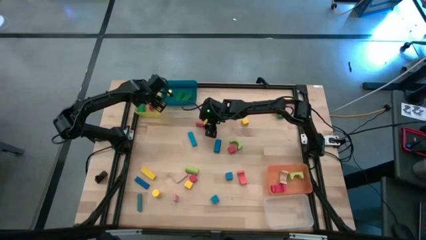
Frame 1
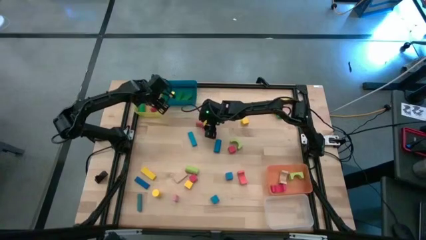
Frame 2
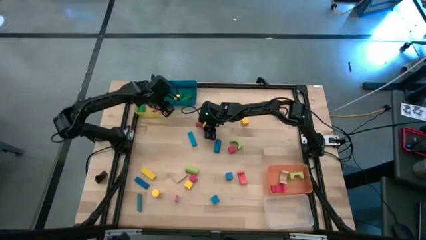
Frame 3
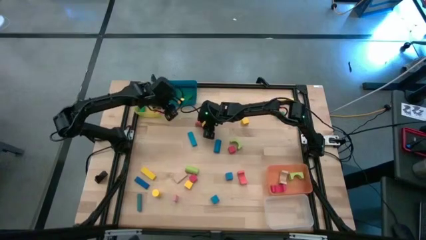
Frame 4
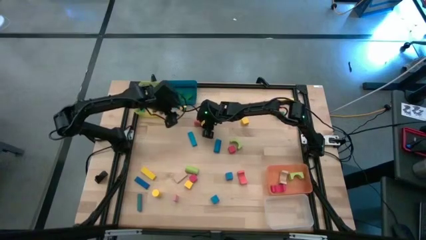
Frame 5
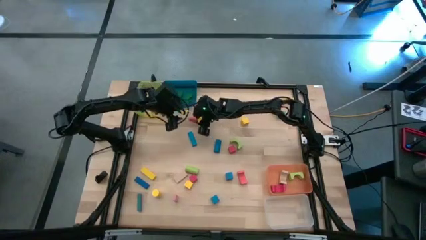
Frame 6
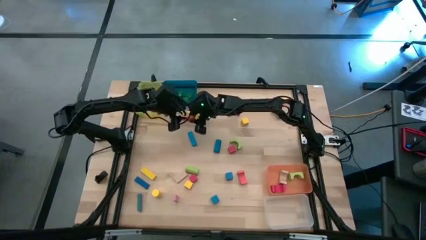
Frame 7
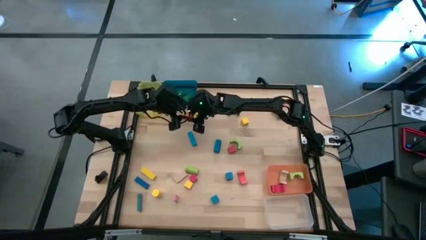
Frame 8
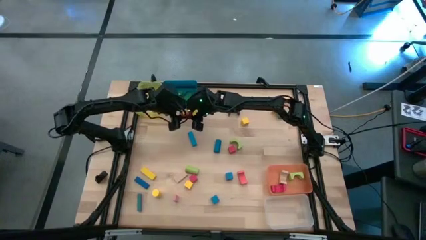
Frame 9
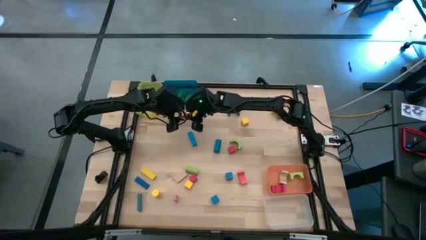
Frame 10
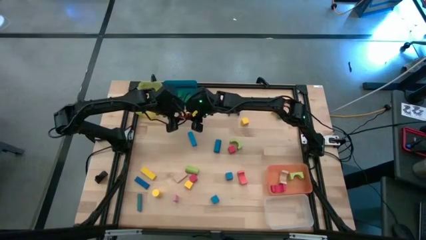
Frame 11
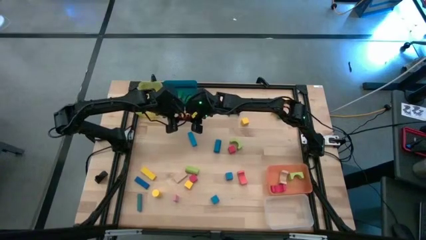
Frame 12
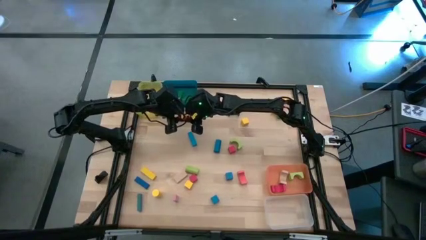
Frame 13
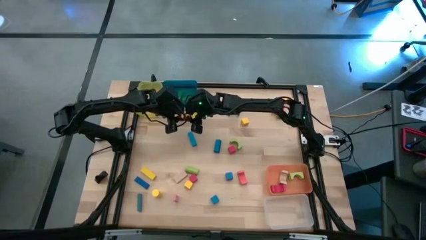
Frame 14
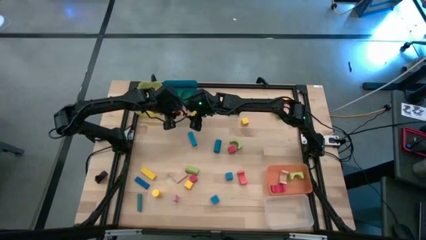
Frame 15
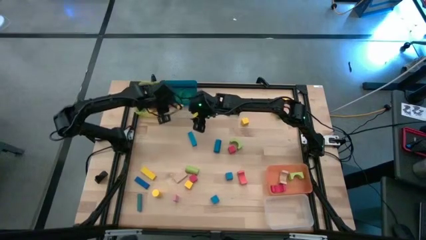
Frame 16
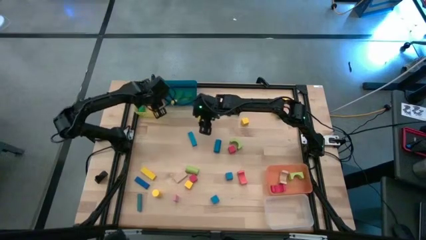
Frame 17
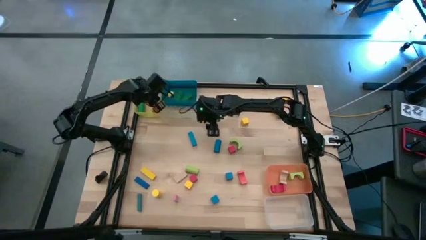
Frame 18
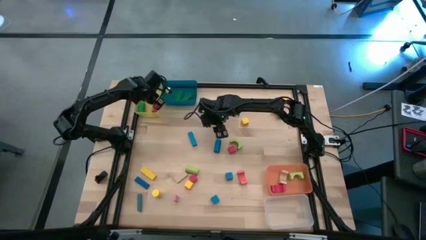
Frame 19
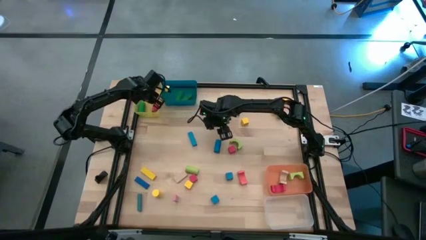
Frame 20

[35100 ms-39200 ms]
Task: Sort blocks by size
Put the orange cylindrical block into the yellow bin

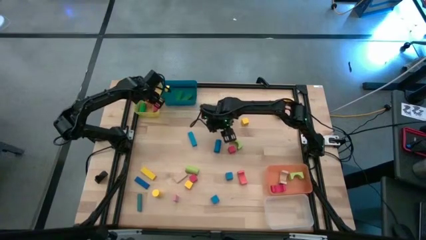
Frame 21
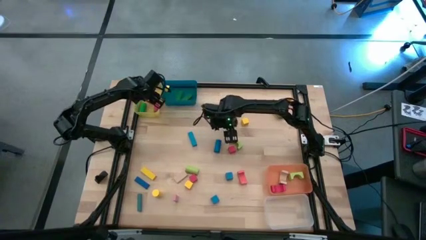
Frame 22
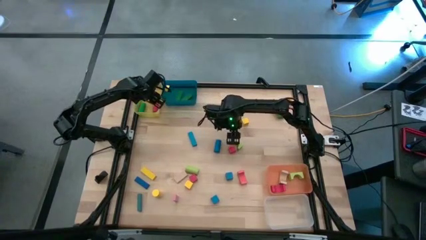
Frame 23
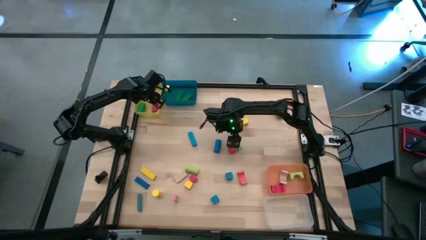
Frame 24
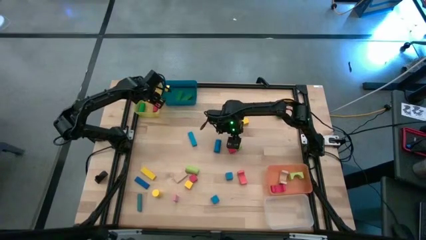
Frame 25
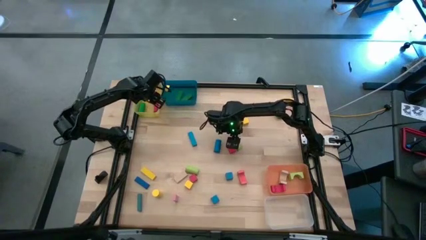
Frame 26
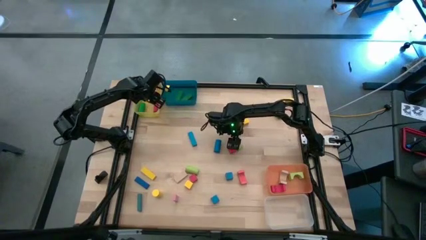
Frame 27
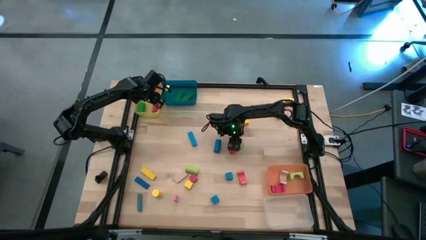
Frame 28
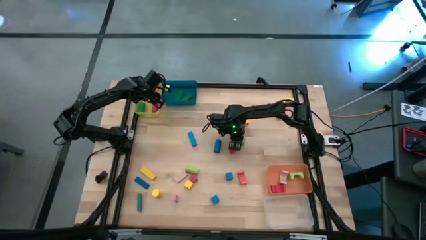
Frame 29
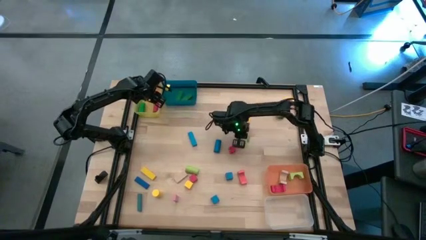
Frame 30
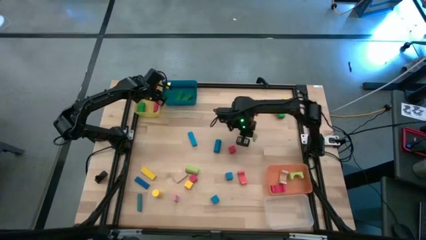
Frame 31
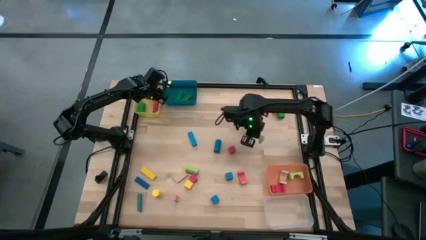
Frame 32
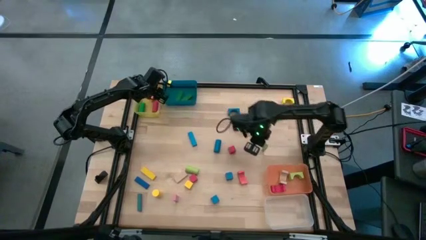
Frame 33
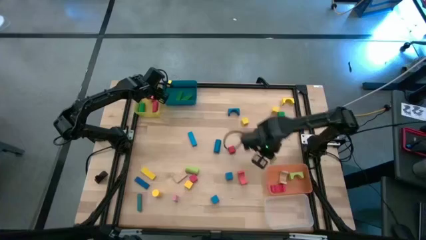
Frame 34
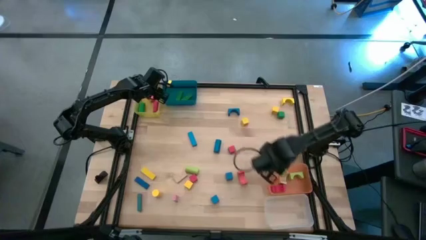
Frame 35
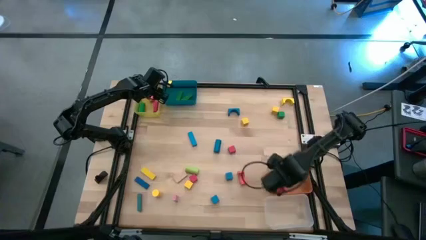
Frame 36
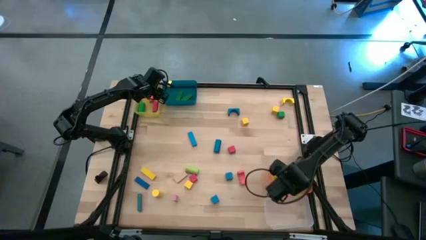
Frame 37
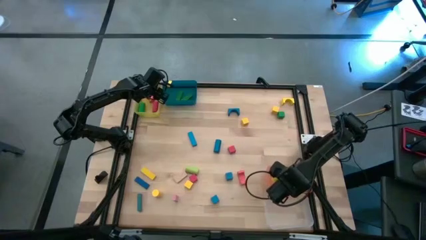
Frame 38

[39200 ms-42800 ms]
Put the light green arch block into the orange bin

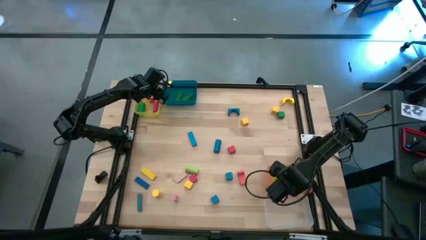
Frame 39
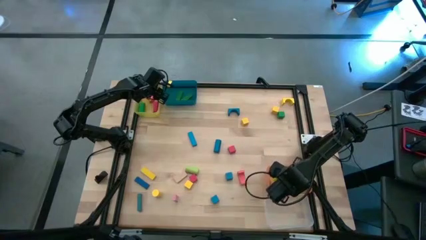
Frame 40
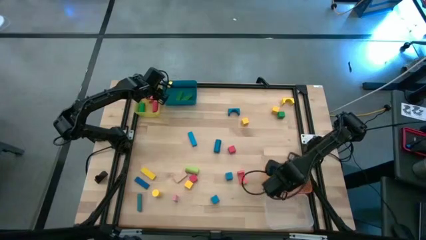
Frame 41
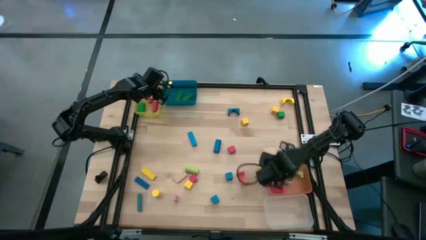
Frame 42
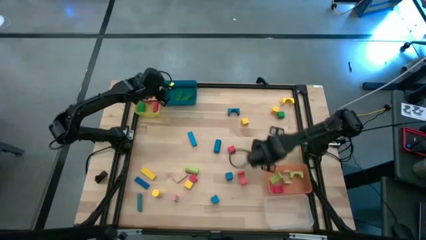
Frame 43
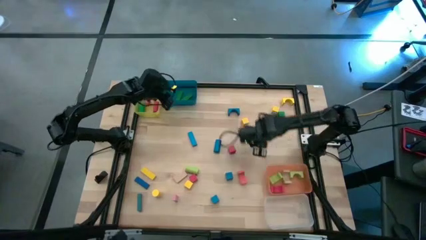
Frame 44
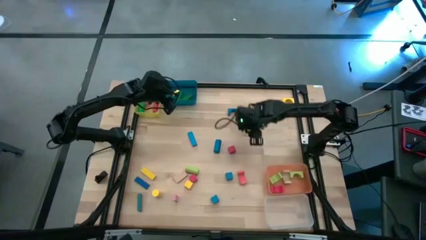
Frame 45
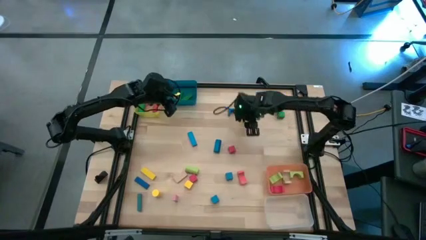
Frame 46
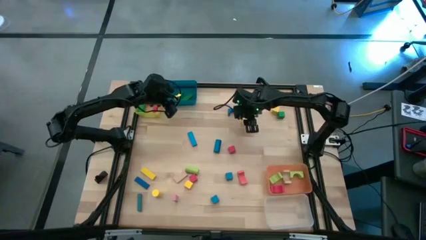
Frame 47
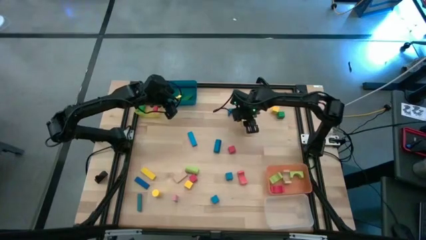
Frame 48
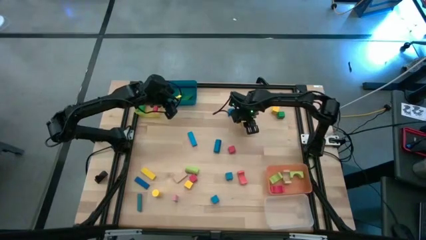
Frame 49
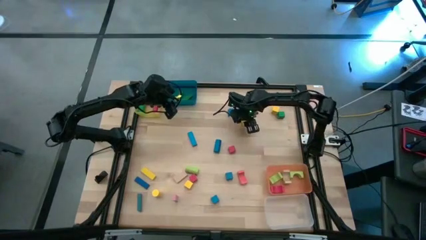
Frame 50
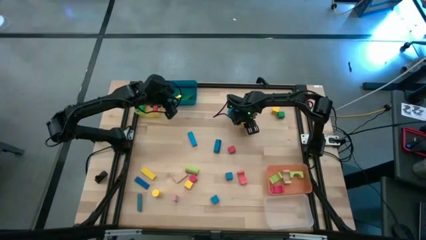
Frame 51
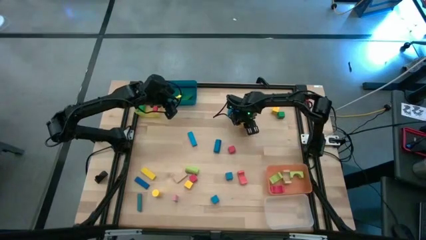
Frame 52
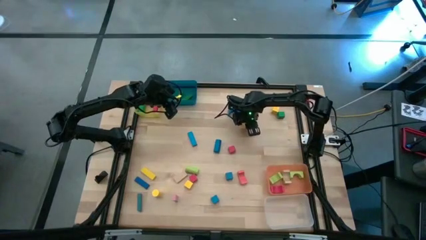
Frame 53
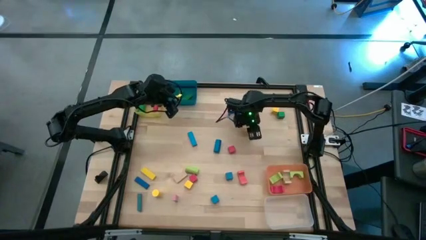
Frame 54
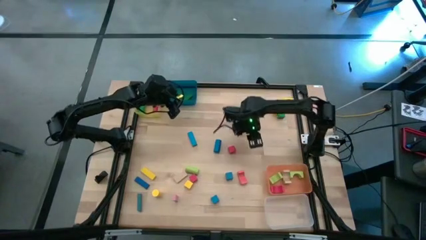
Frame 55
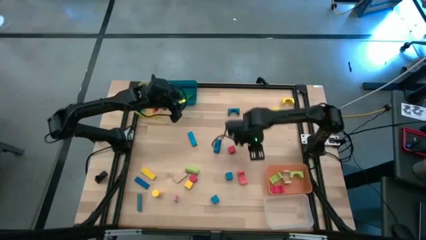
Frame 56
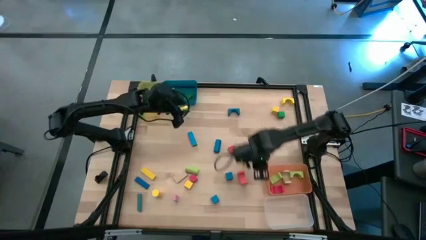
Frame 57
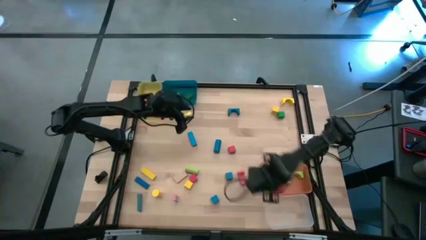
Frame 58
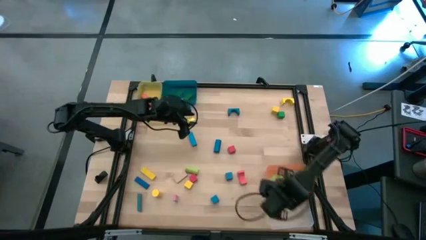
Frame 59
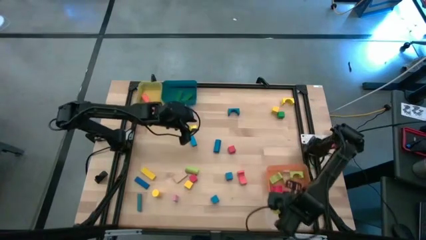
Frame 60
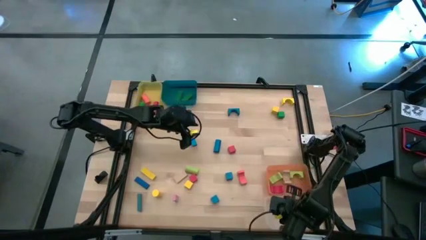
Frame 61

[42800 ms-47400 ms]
Put the yellow square block into the transparent bin

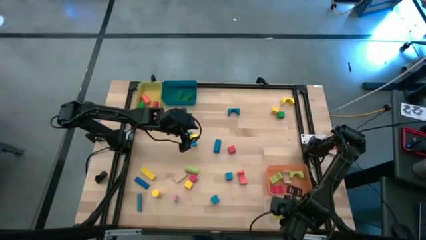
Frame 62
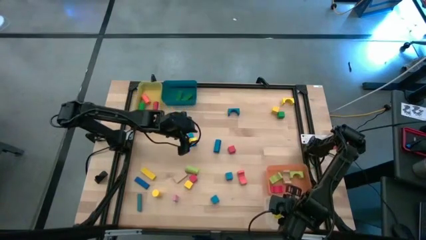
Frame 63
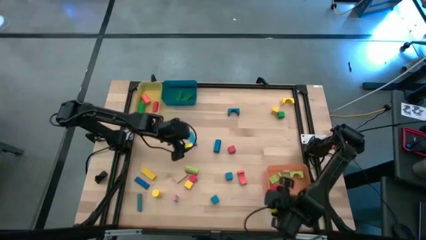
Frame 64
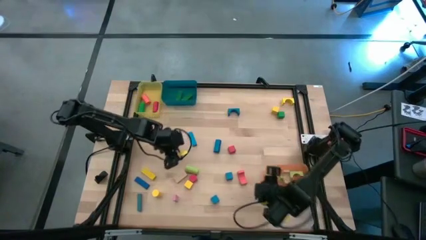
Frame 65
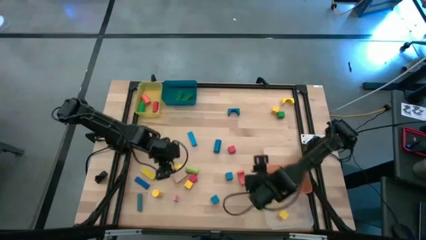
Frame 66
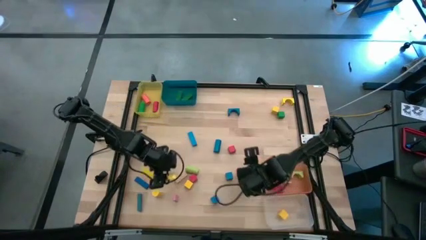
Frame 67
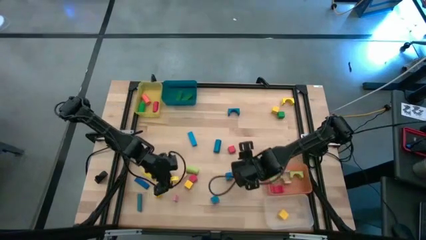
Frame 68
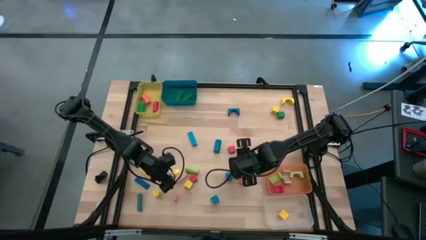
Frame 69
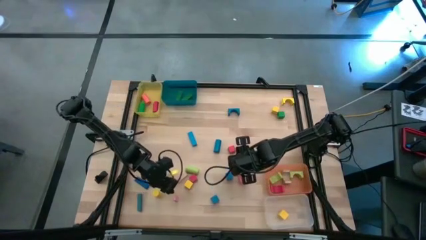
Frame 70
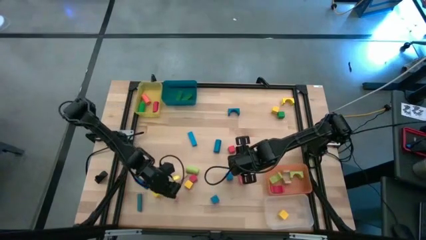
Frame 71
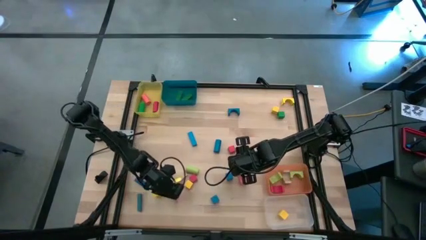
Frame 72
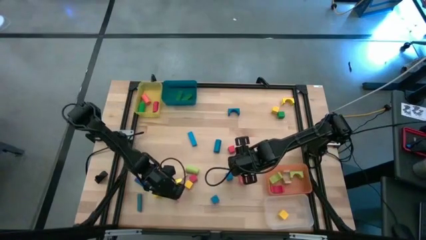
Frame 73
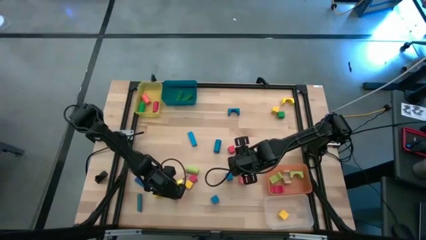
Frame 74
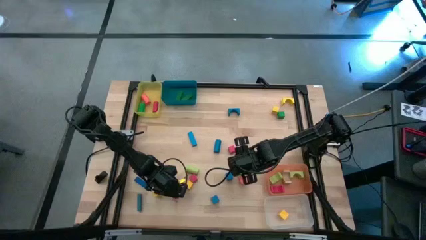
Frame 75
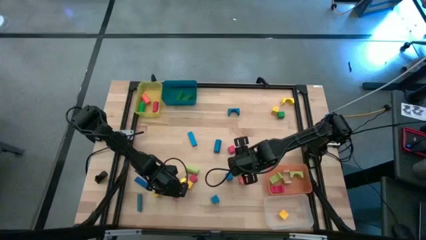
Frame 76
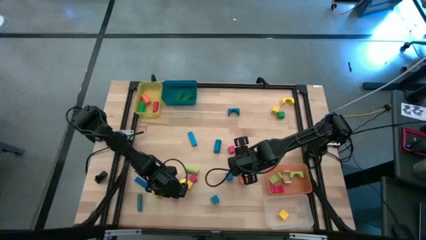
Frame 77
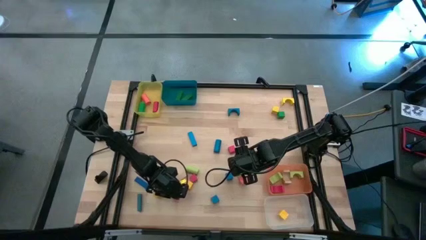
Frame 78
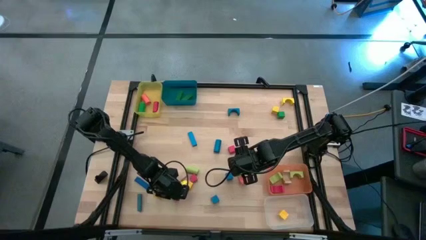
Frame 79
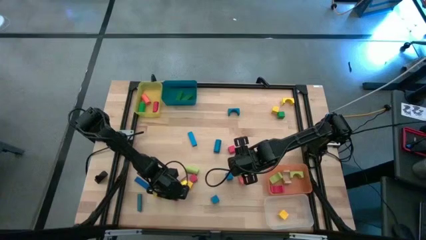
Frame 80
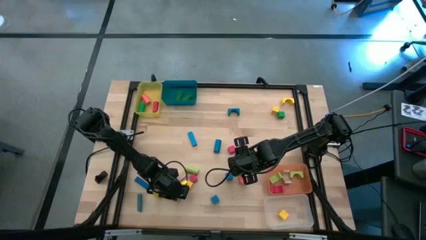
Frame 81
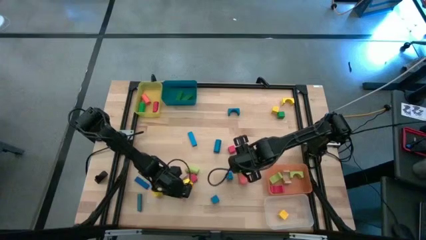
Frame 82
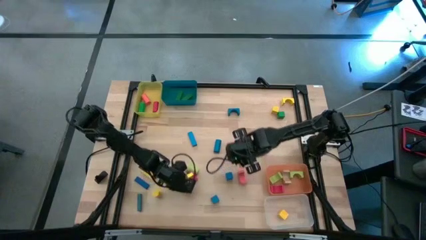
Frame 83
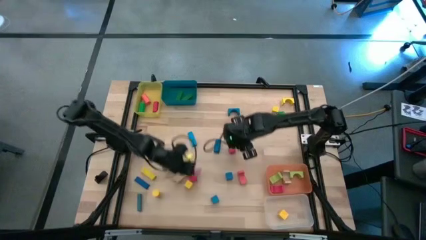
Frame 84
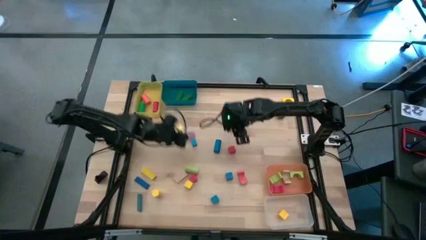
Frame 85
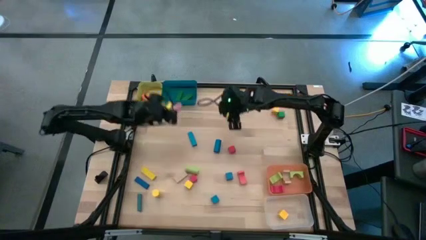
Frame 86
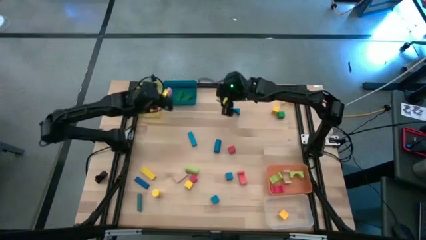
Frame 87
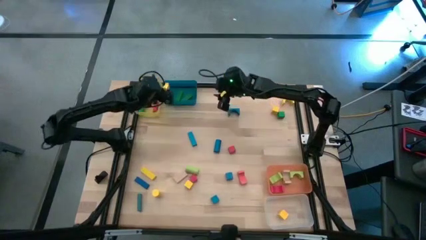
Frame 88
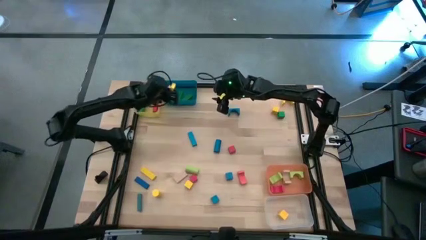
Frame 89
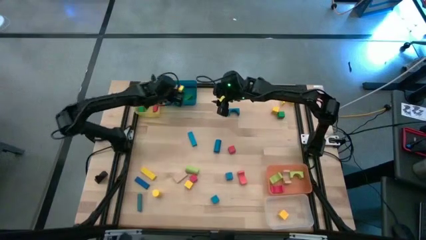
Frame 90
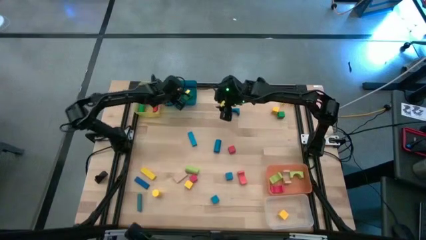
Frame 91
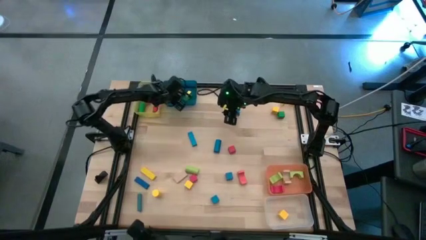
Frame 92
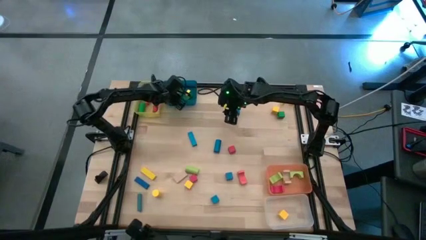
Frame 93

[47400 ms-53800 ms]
Put the pink rectangular block into the blue bin
